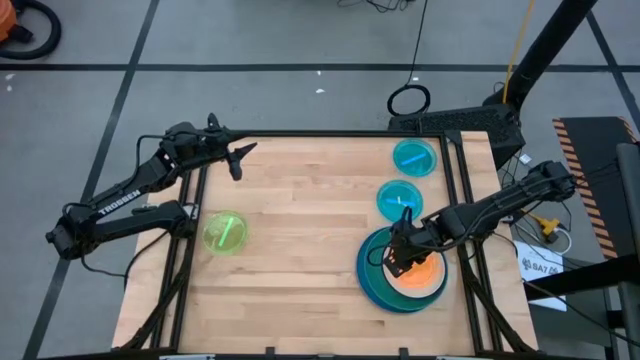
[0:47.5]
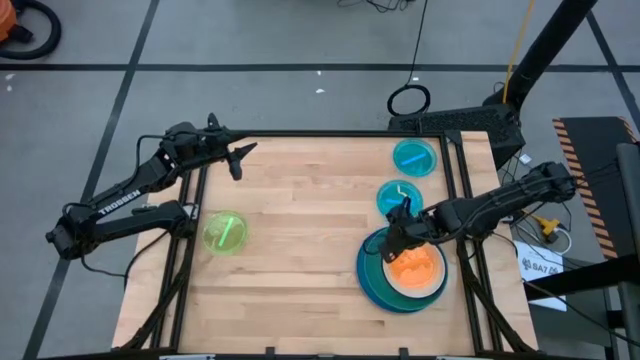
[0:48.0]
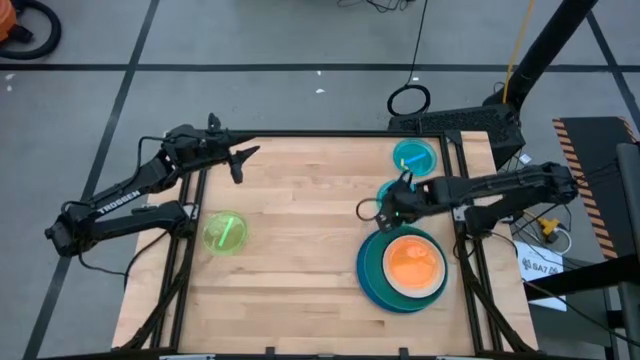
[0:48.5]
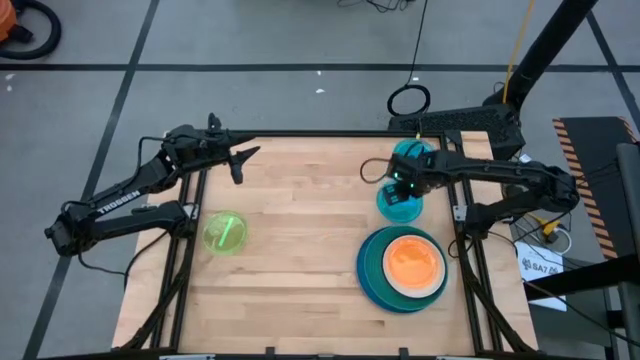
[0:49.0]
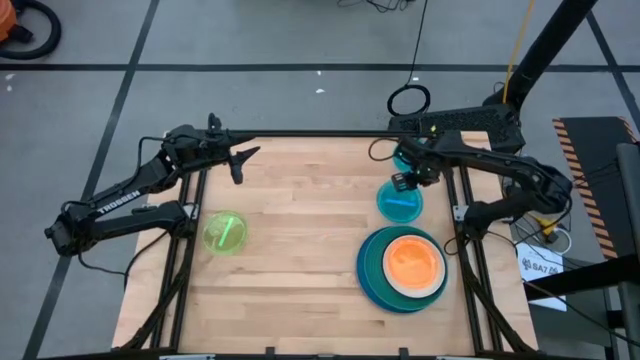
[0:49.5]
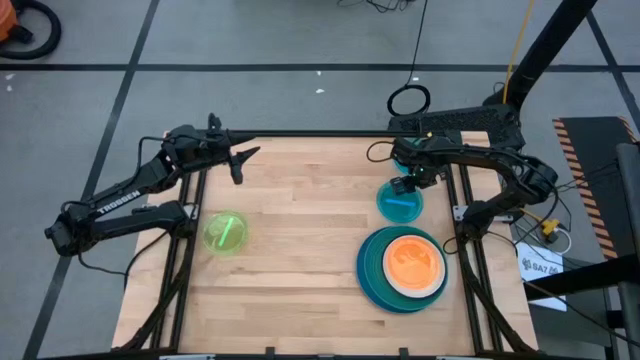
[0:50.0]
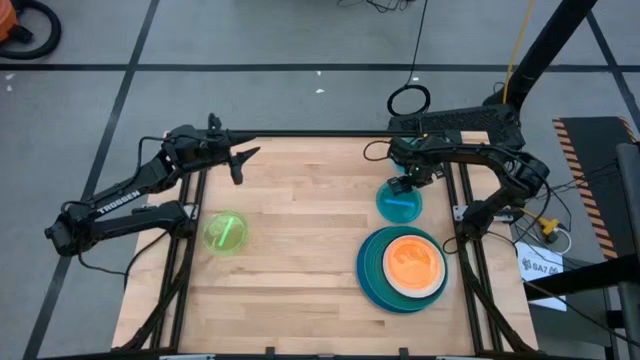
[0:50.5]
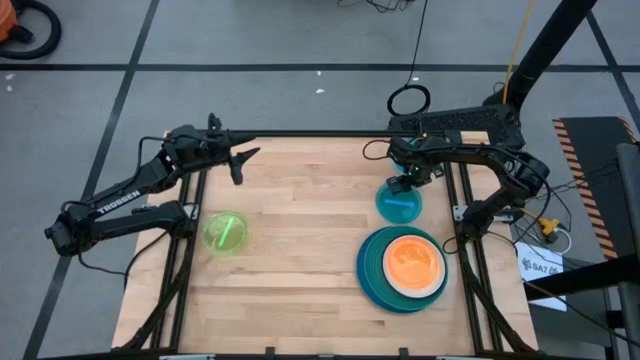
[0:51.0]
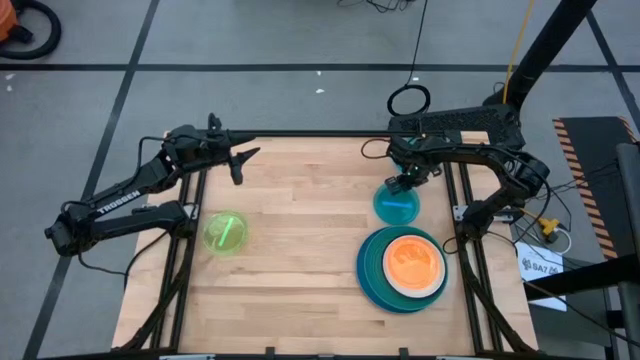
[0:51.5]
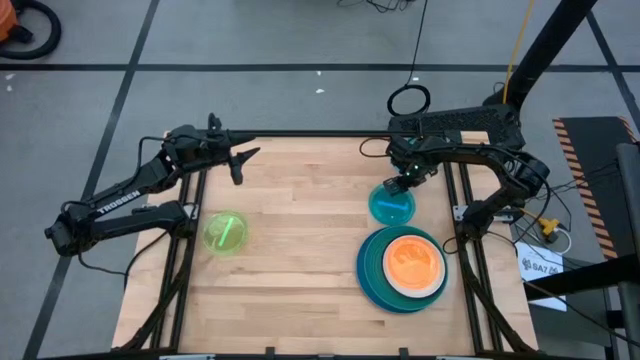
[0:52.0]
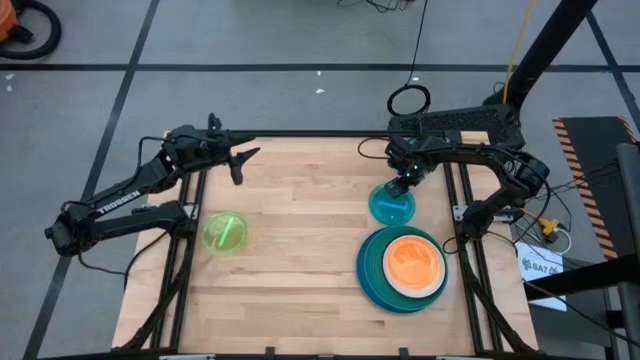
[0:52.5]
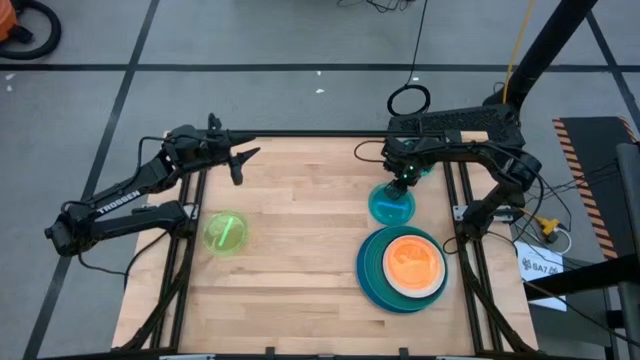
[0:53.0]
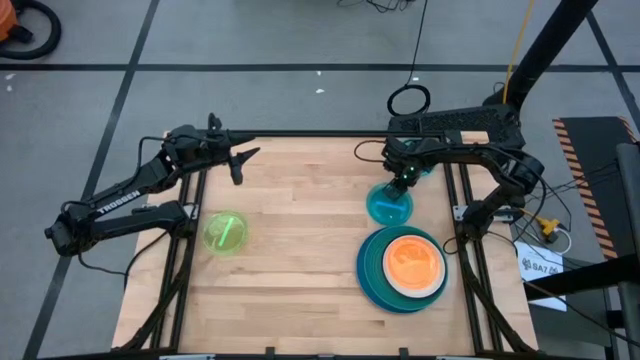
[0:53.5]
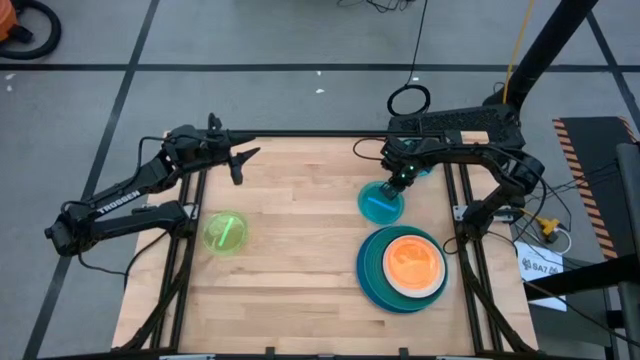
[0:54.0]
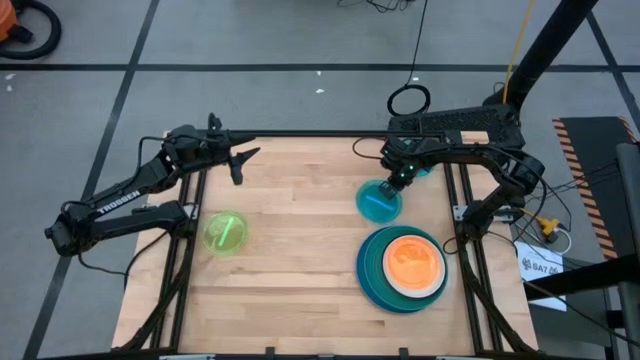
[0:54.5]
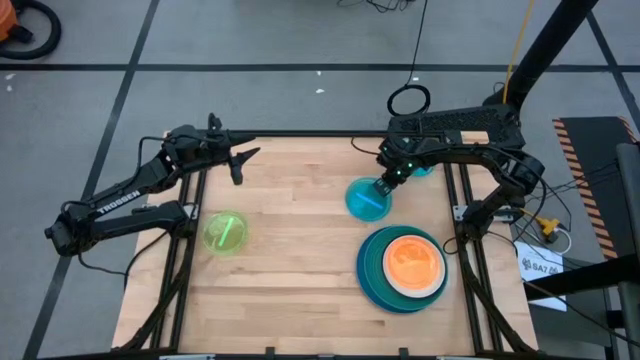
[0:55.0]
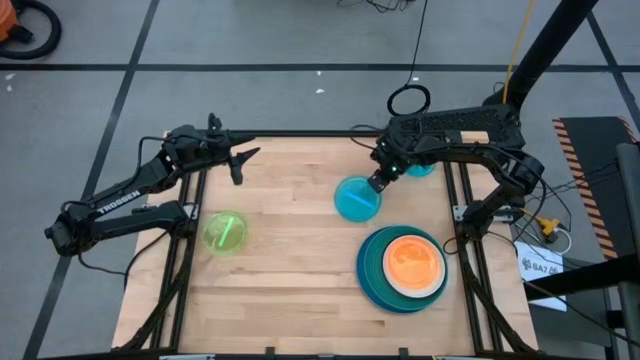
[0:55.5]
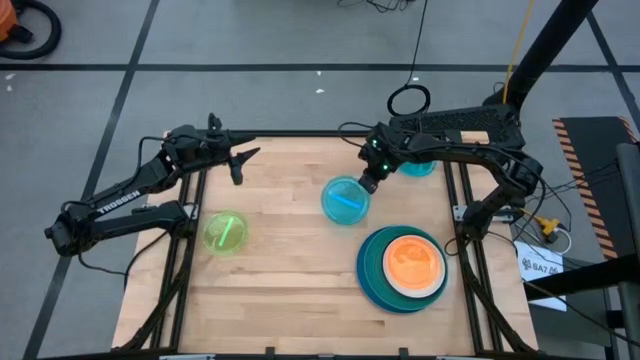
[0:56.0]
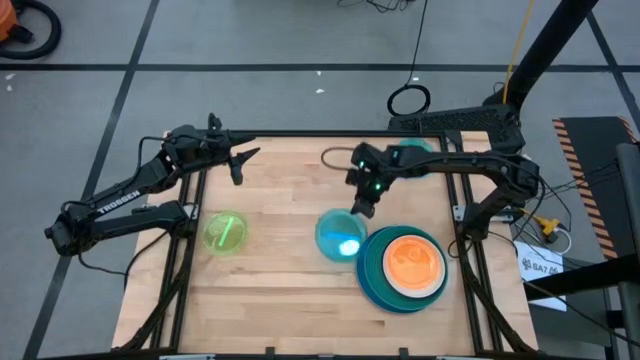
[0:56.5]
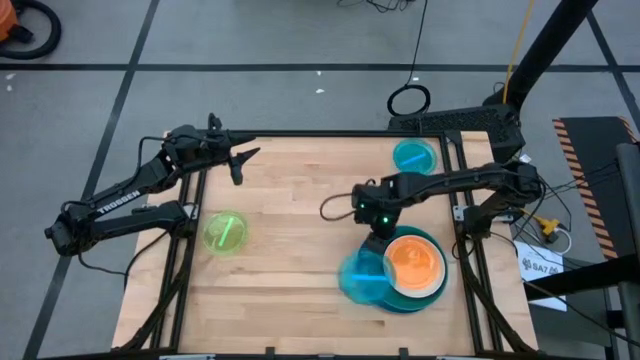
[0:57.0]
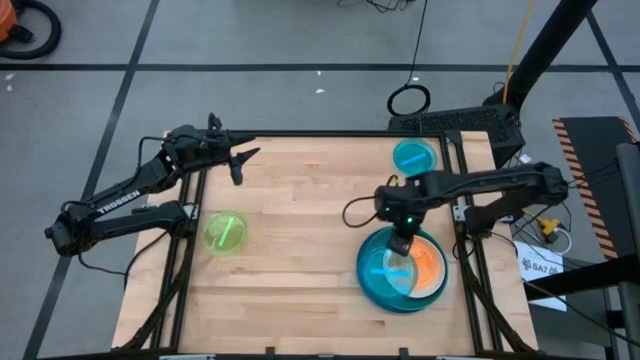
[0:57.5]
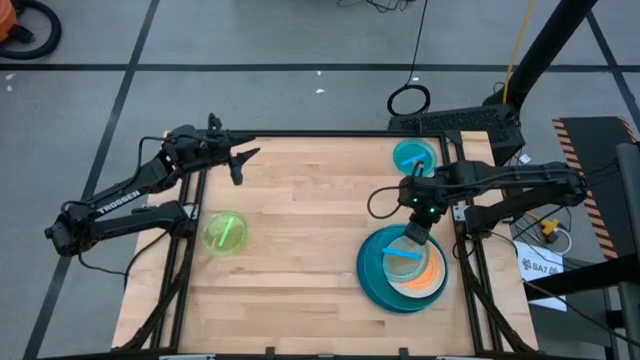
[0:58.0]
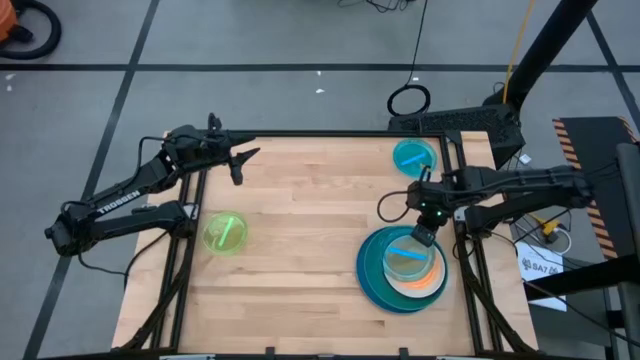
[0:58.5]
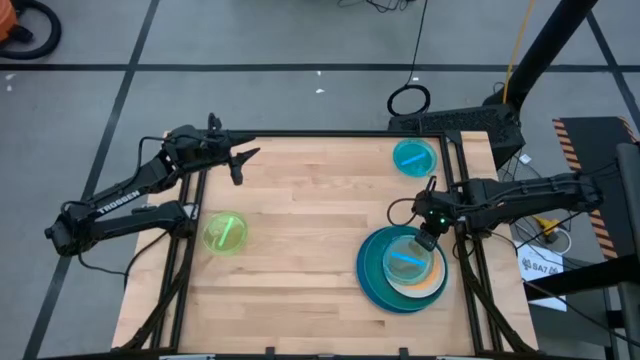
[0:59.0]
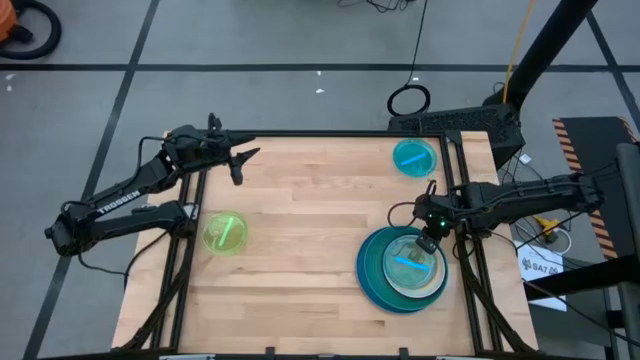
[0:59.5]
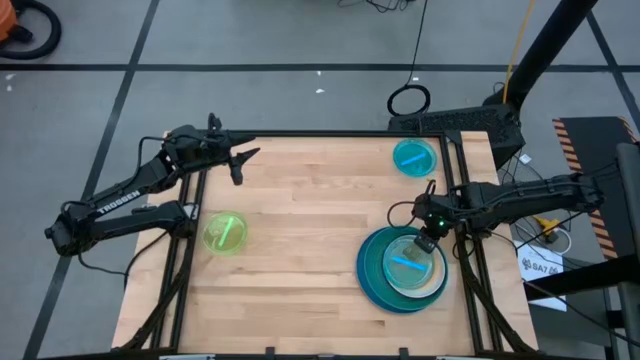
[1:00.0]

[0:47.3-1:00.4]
Task: Stack plastic plates
Stack the bottom light blue plate on top of the orange plate

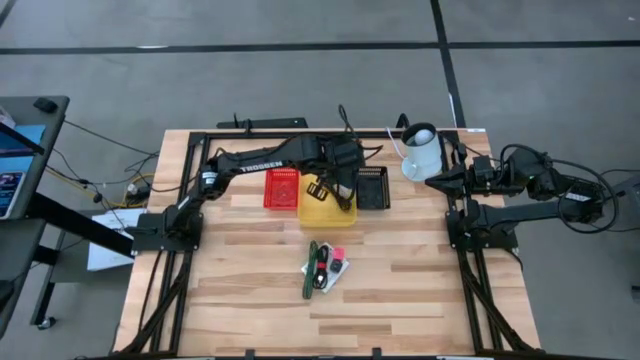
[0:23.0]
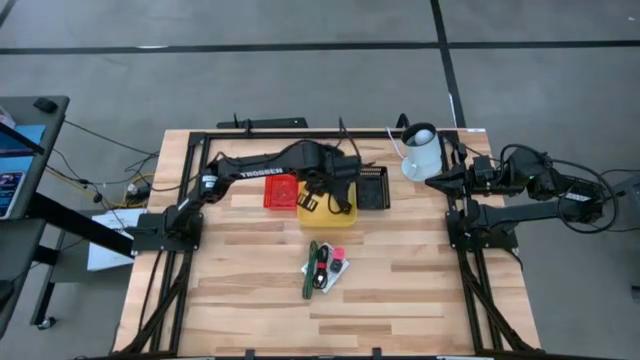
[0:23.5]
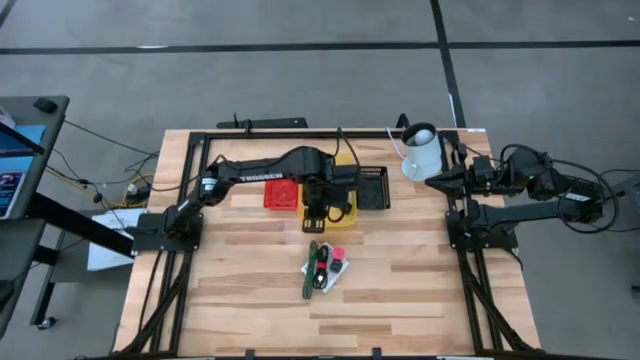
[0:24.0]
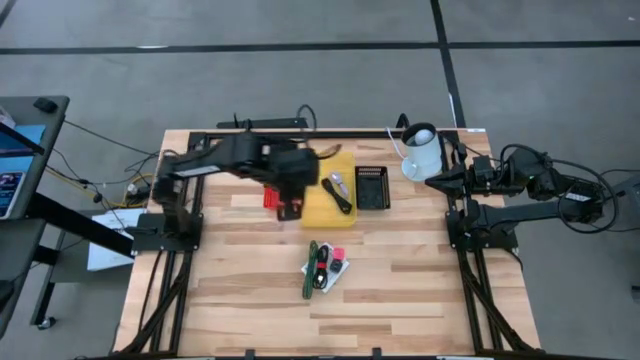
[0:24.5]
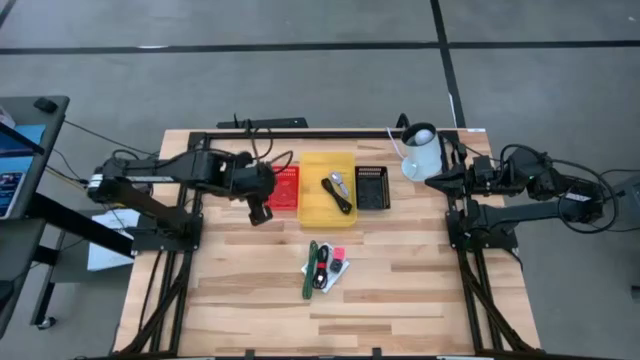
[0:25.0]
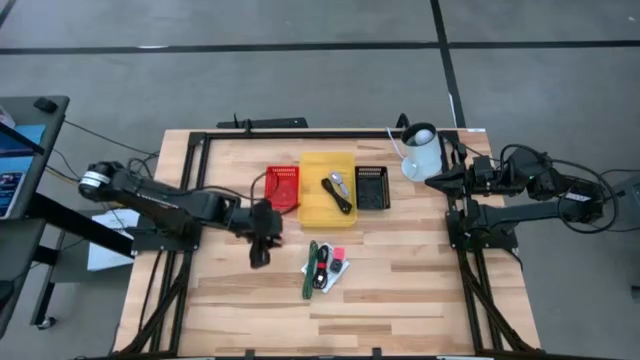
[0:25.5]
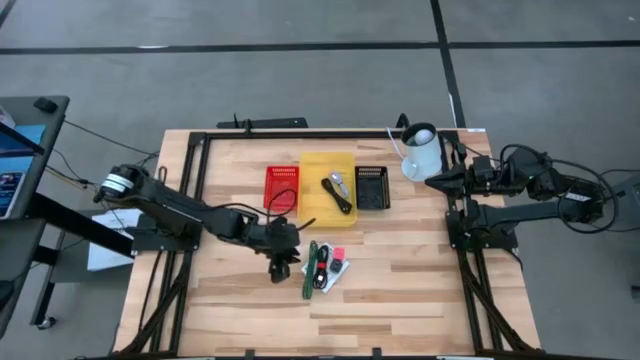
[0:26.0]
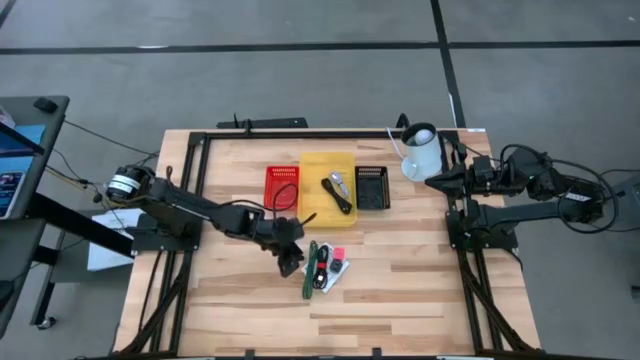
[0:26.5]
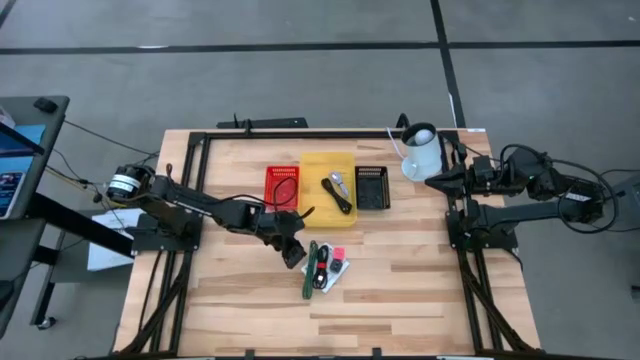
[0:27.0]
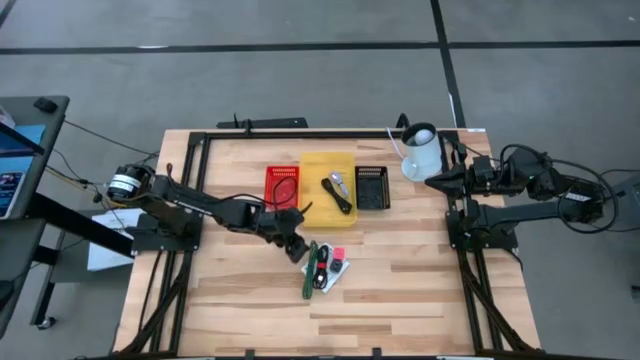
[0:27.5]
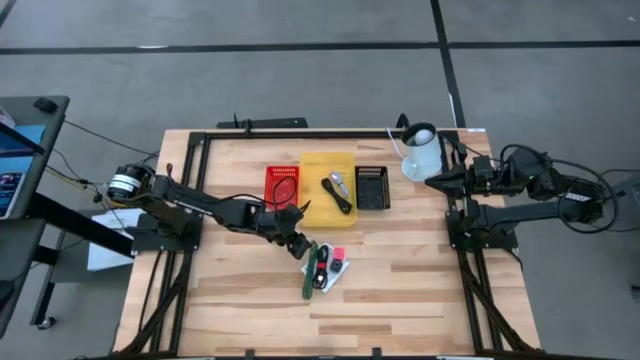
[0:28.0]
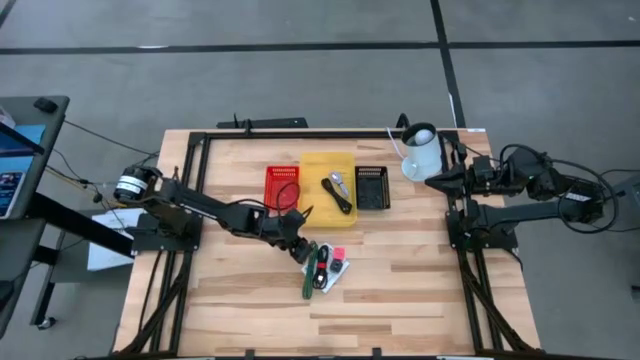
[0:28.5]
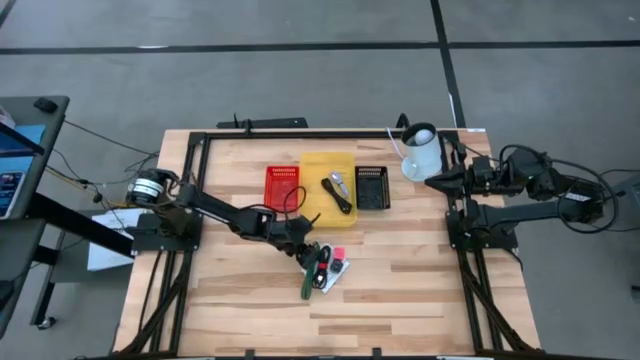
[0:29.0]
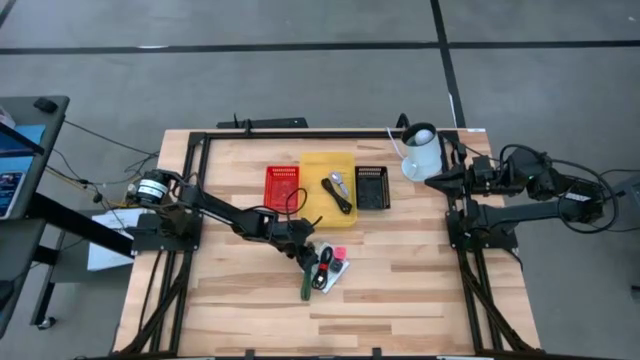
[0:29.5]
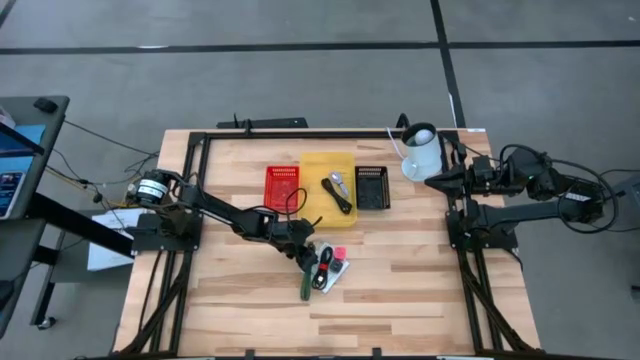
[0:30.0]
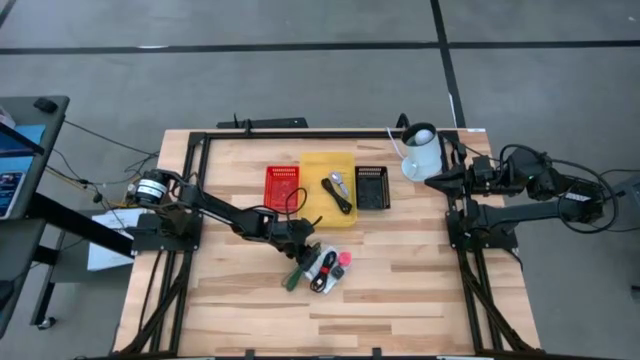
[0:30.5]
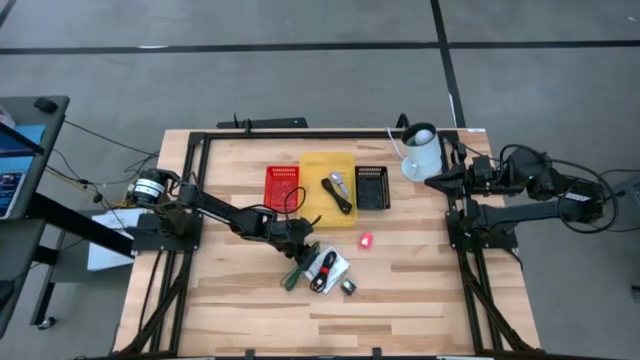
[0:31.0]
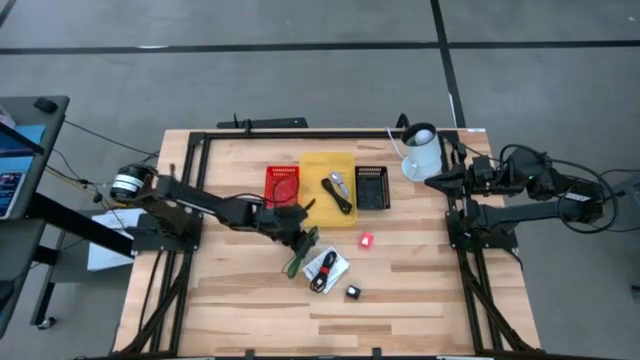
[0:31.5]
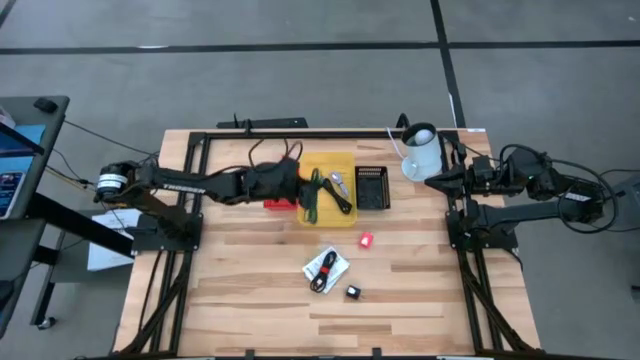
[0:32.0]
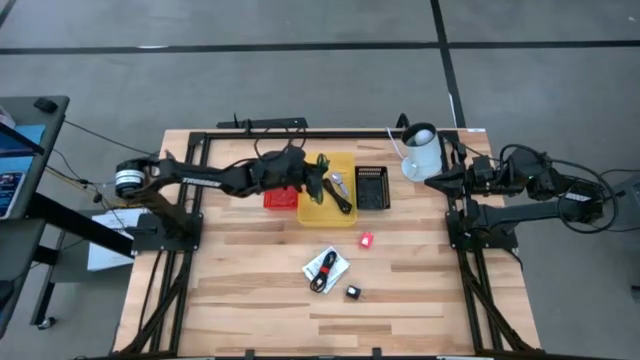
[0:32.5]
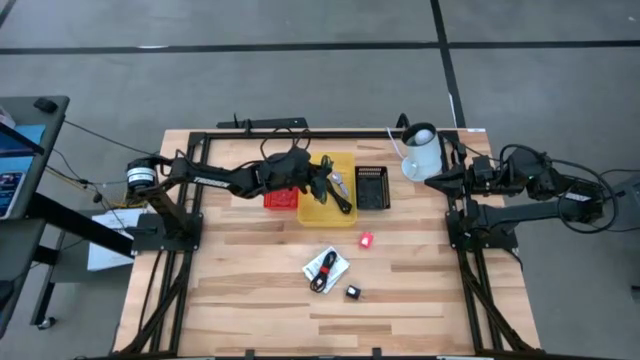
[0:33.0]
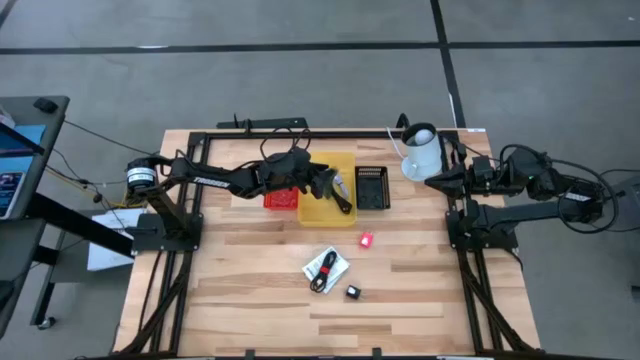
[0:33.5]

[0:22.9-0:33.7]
Task: Pick and place items into bin
Put the green charger cable in the yellow bin
